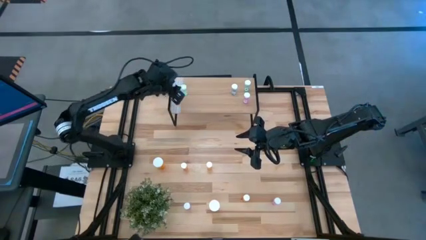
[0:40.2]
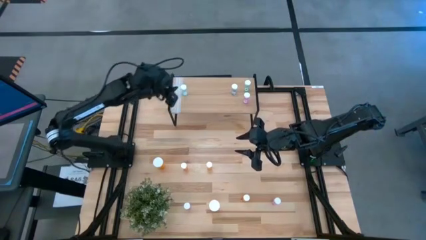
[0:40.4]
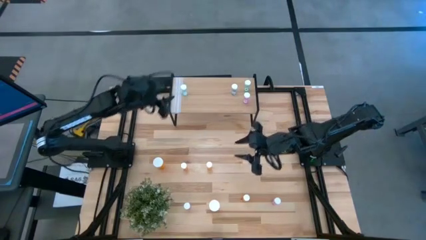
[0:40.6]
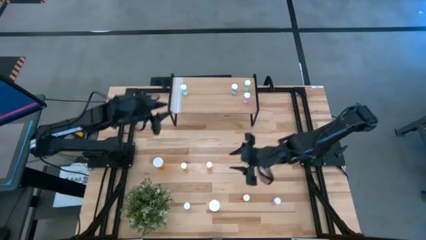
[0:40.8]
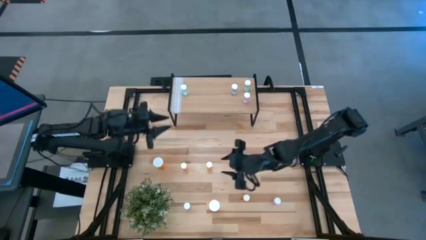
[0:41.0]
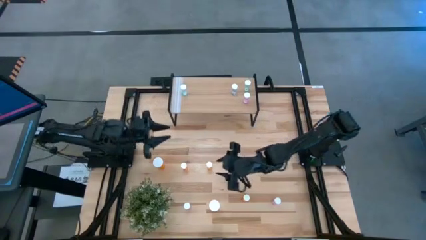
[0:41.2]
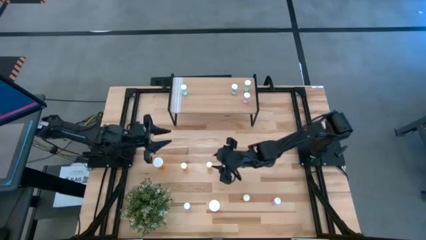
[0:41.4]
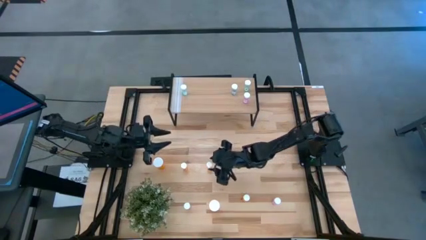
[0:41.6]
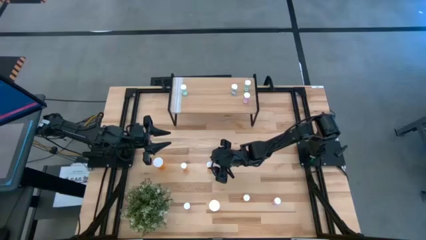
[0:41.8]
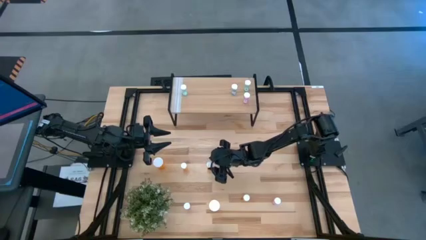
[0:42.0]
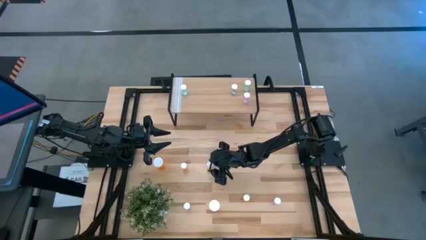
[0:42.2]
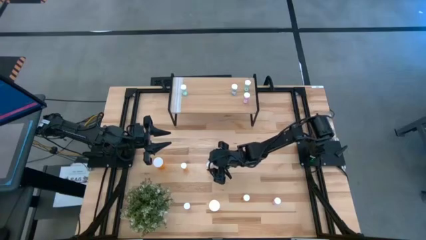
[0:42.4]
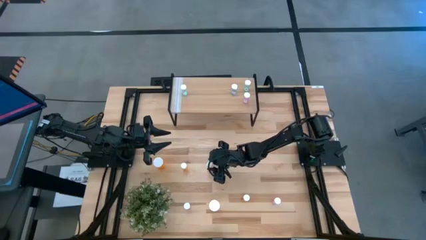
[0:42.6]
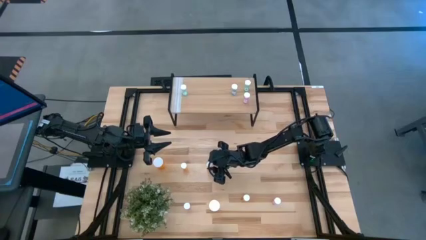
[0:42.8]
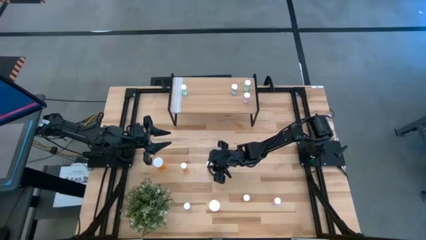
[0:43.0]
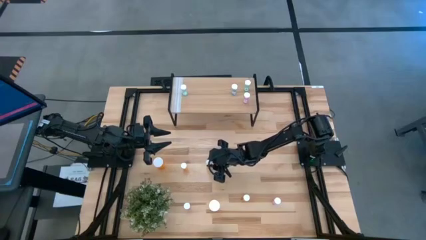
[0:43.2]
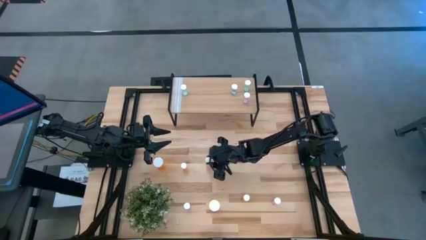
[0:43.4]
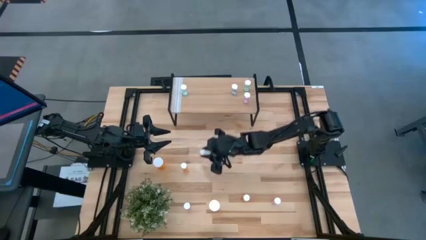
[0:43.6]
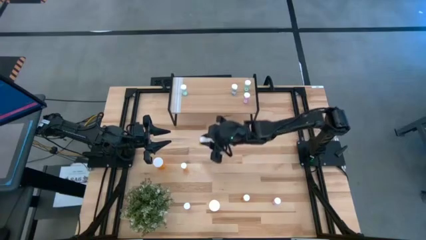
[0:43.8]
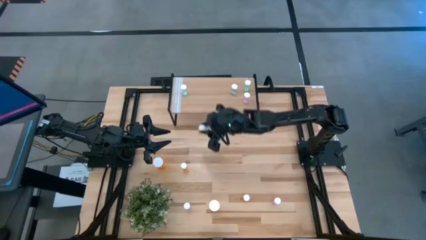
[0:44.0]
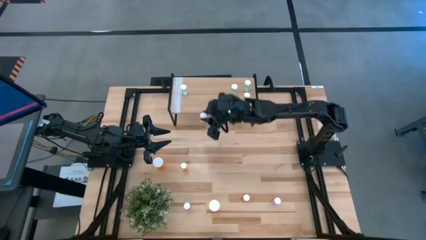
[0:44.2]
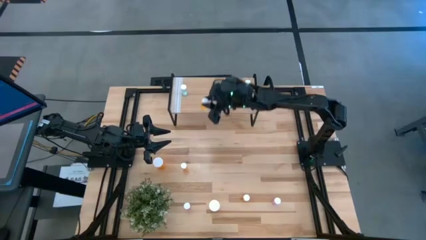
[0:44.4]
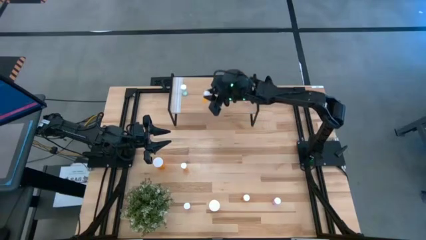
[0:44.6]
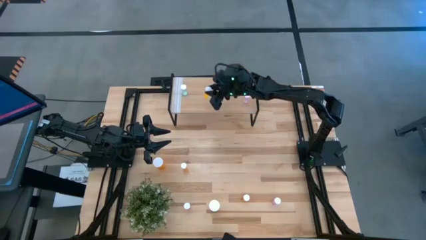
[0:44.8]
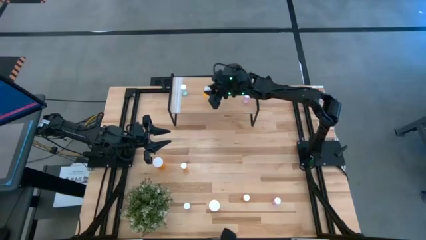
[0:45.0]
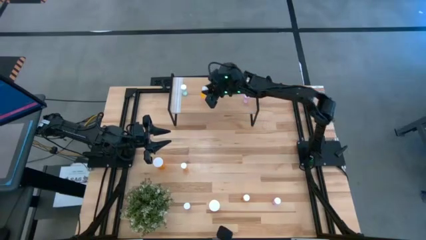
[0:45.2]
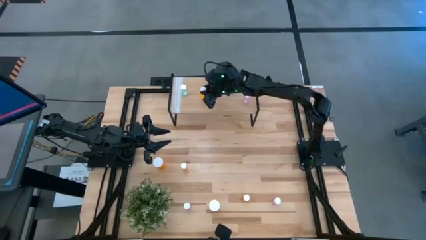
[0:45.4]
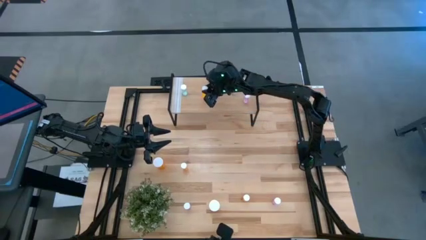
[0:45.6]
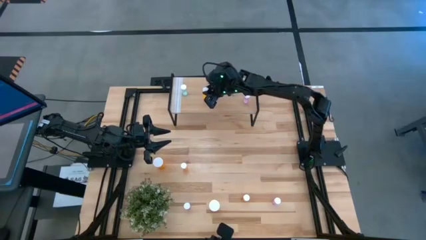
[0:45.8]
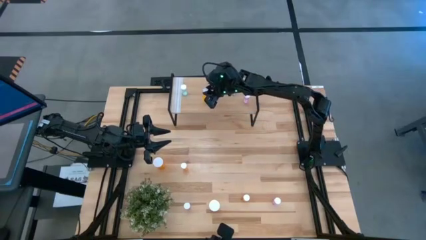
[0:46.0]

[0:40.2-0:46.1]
Task: Pick and place medicine bottles onto shelf by color
Put the top right small orange bottle on the shelf

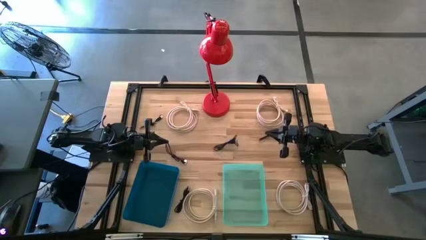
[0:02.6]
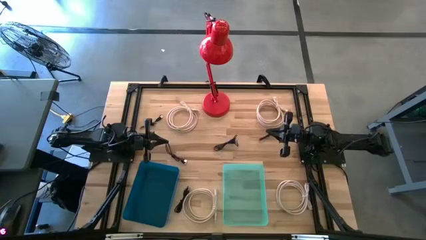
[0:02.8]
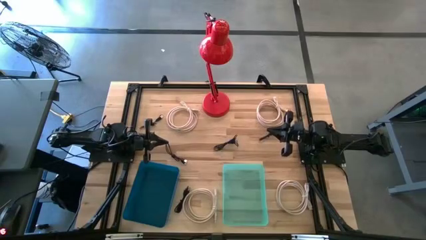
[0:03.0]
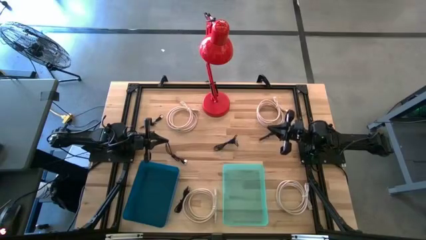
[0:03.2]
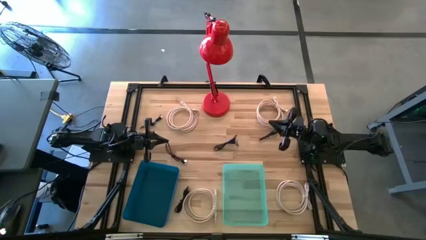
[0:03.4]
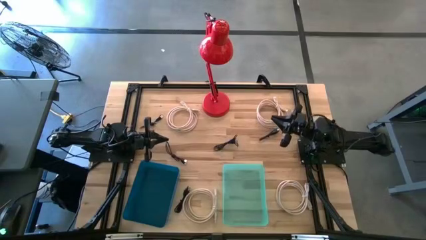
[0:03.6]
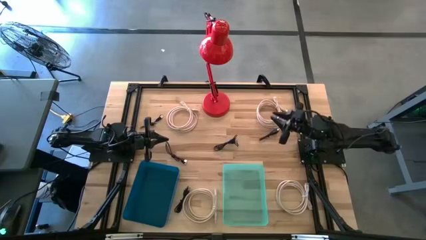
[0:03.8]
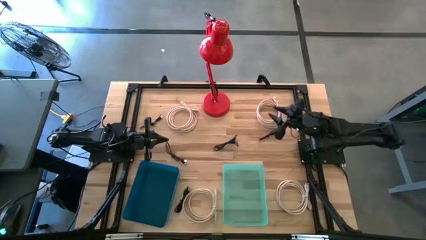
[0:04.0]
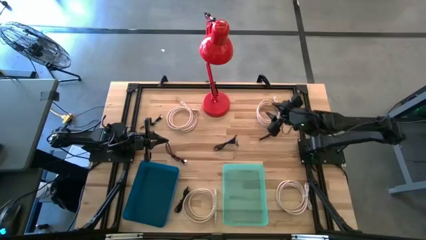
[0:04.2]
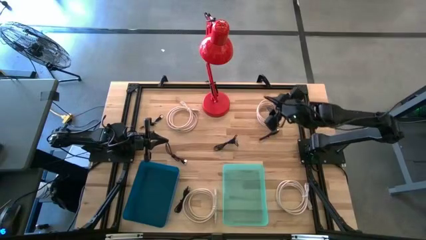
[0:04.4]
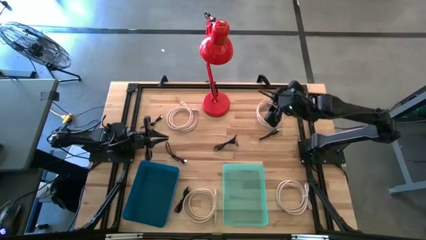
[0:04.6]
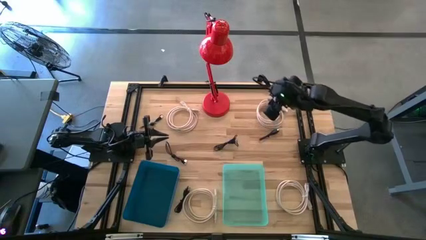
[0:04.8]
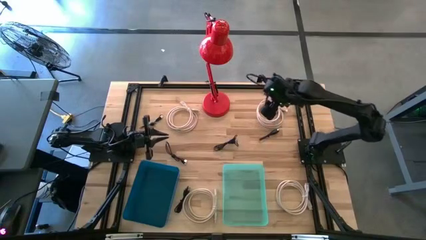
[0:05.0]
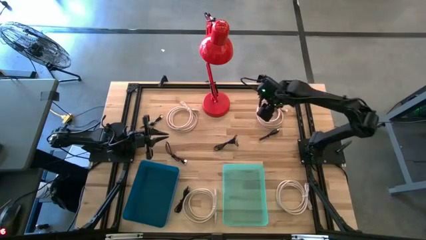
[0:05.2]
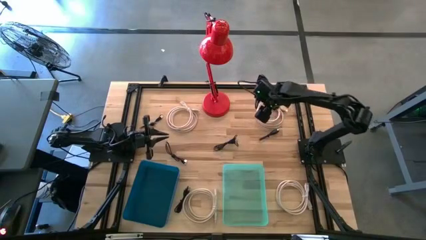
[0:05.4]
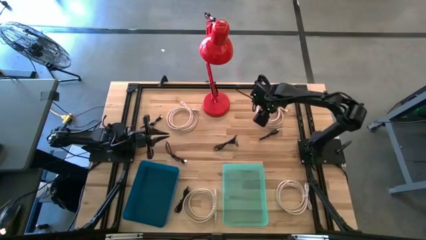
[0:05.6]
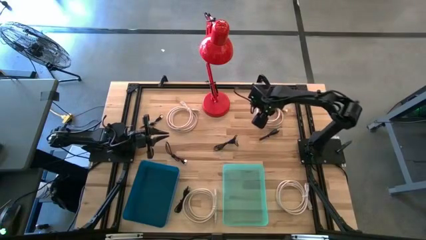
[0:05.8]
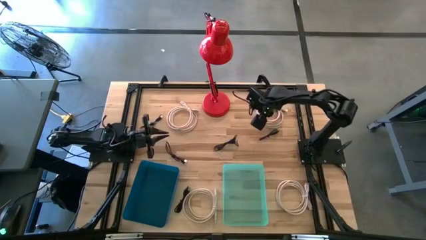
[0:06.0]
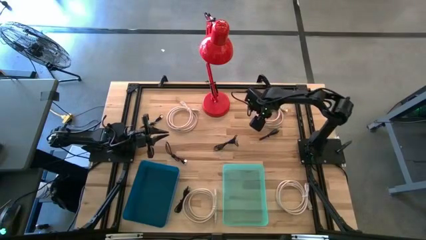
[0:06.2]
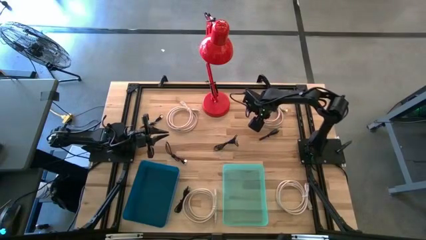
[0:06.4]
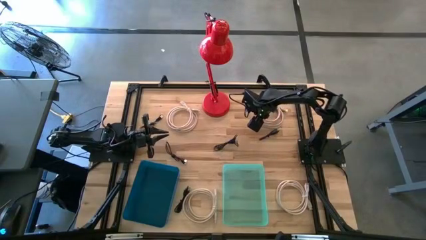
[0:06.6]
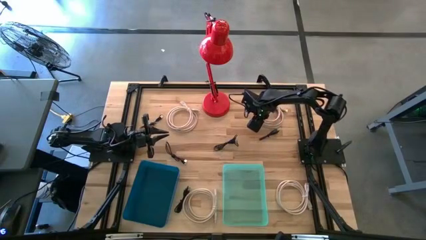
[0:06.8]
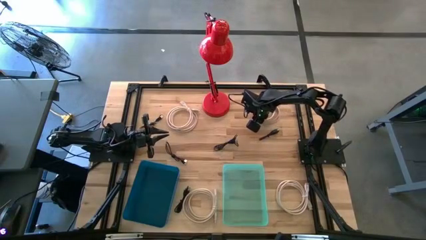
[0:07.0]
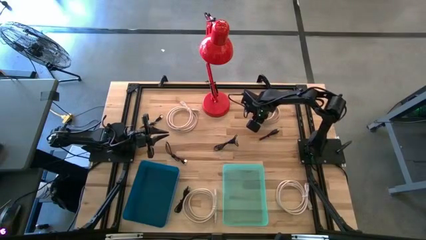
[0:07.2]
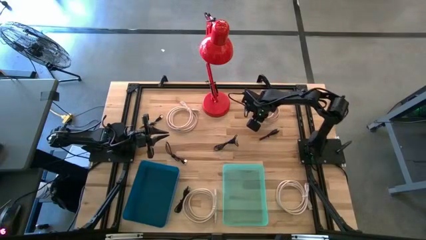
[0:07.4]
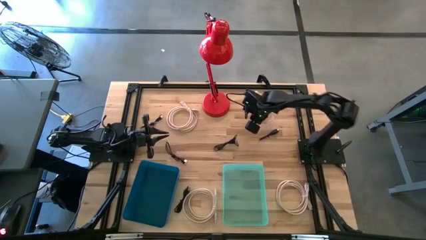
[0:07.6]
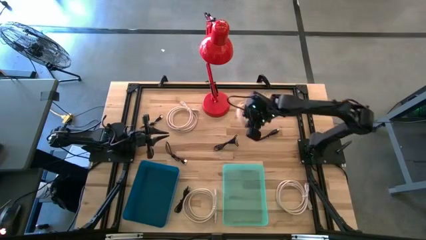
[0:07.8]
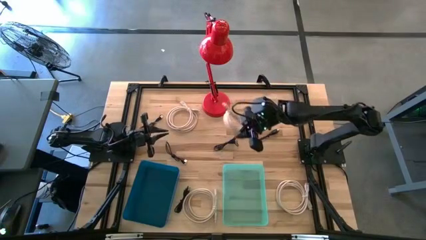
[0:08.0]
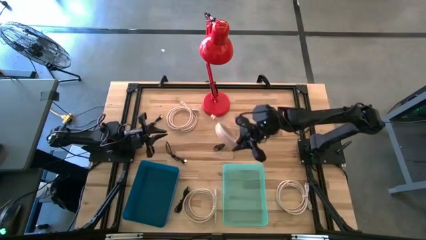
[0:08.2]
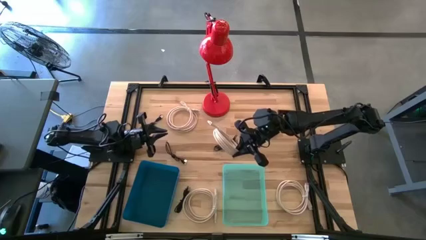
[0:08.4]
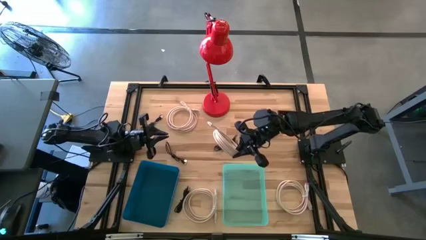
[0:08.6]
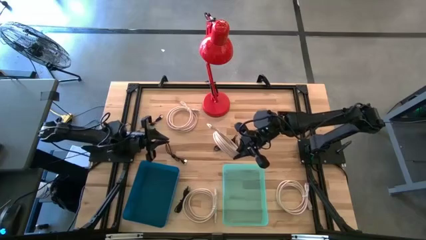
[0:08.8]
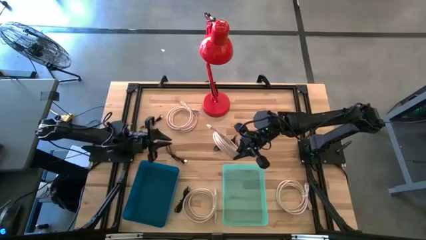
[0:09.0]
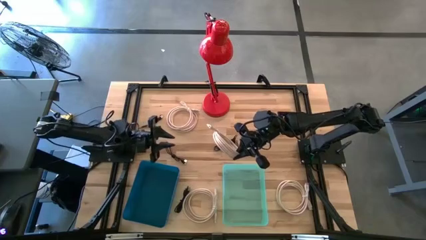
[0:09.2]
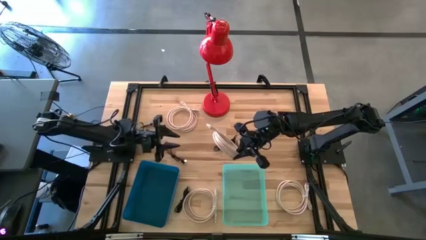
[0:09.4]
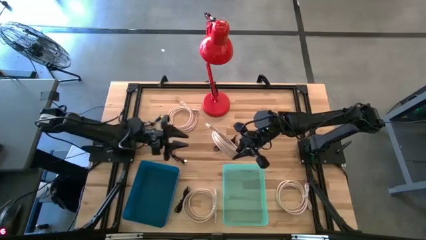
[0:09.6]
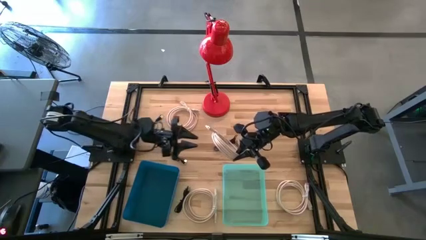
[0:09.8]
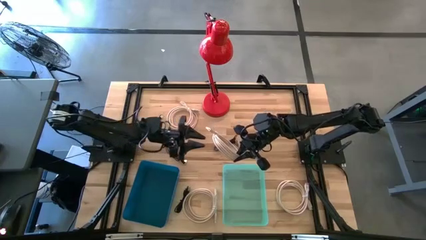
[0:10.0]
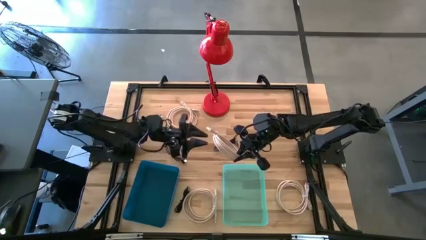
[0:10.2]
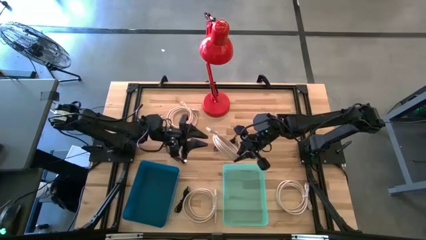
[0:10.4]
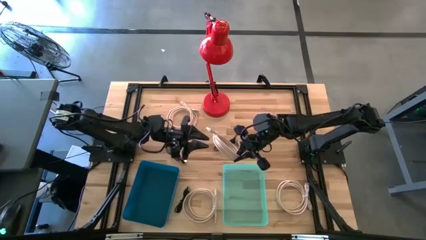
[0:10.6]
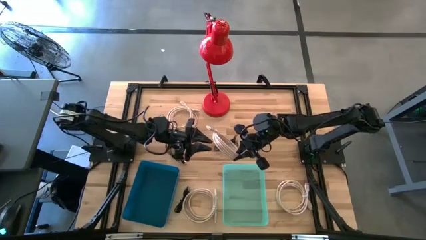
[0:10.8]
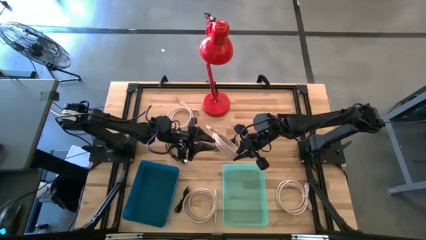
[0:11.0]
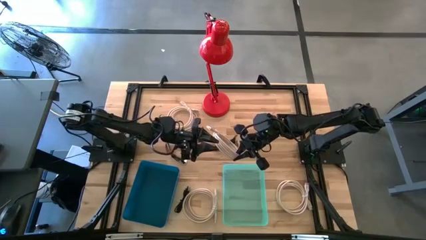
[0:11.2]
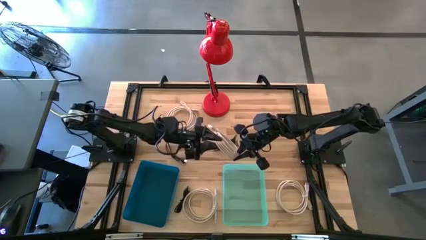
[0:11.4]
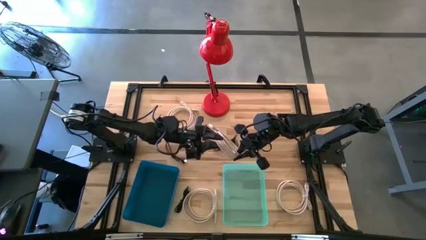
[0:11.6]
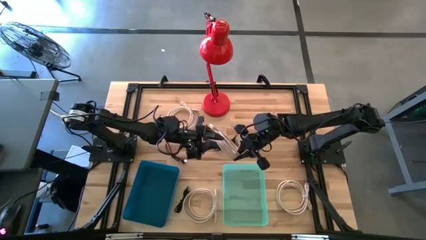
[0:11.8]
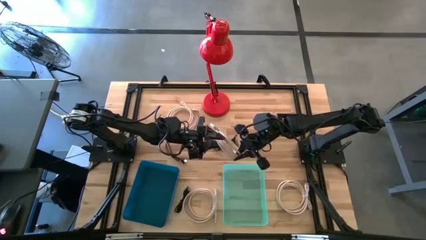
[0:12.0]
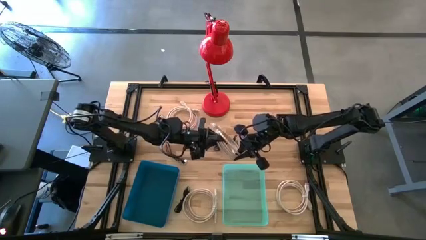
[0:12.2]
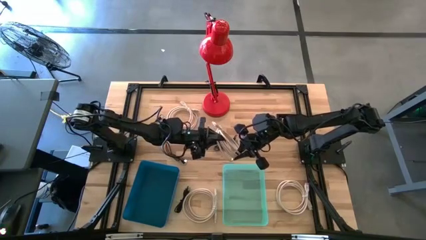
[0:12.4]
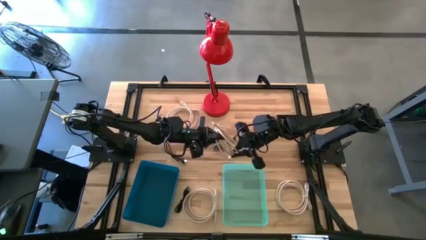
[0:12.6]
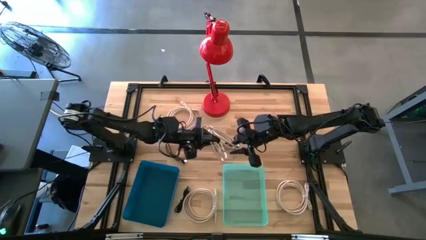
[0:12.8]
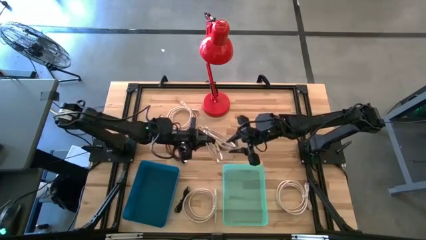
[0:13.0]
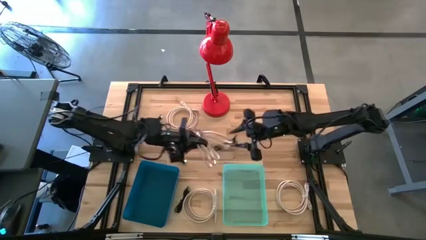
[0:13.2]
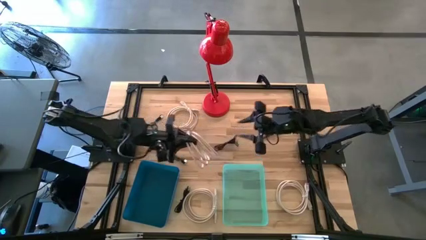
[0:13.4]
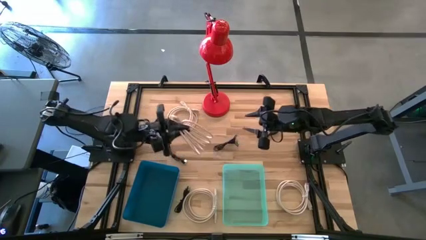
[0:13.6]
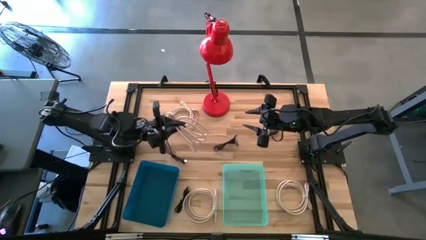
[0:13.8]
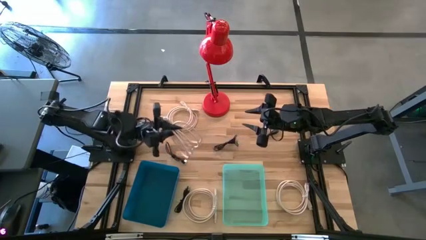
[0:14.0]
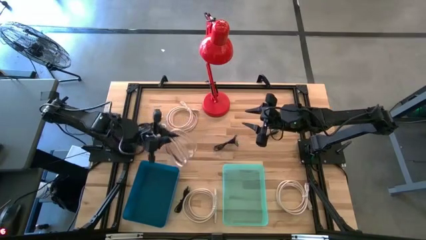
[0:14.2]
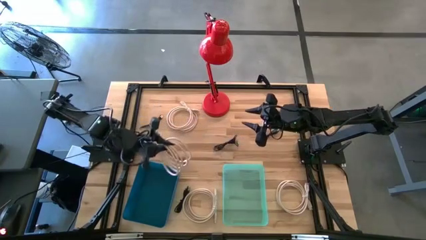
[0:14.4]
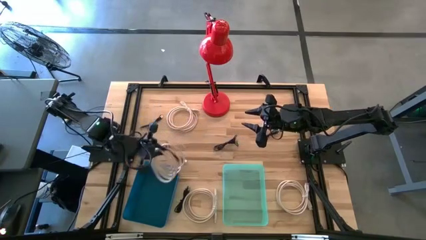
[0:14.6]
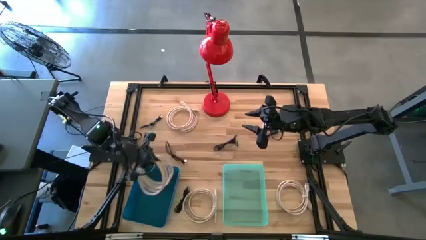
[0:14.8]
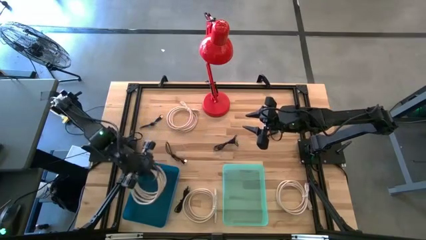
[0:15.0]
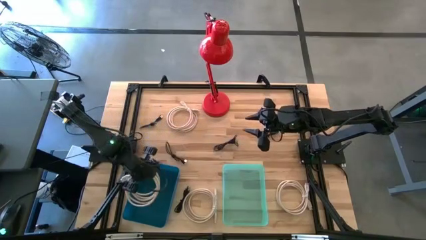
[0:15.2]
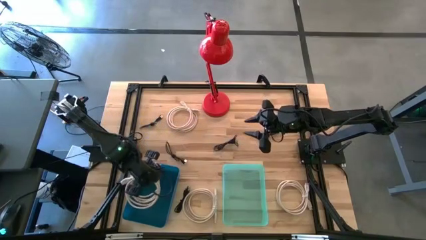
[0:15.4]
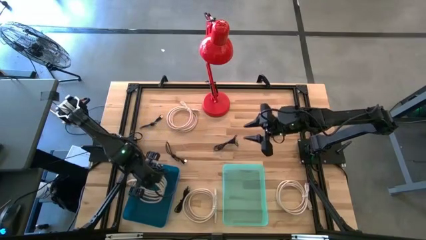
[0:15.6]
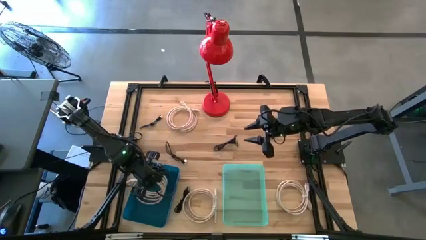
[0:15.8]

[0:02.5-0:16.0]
Task: Pick & Place USB Port
Put the brown HDMI cable into the blue bin
